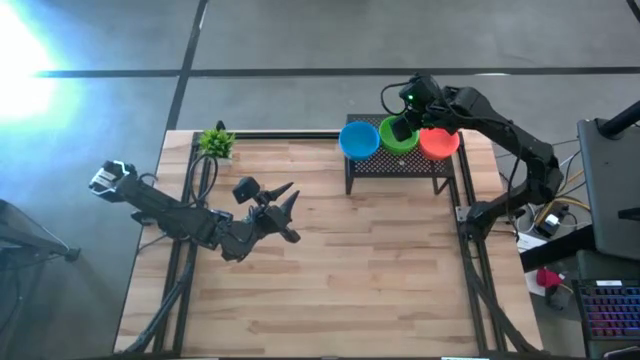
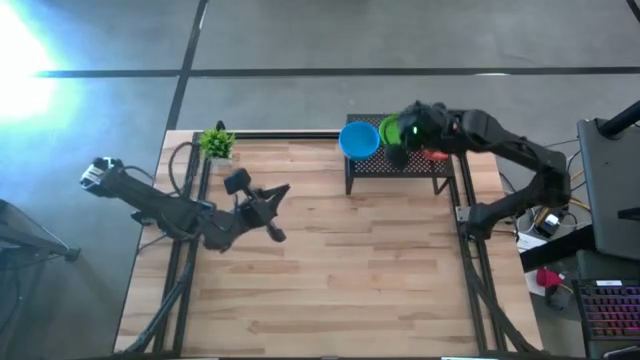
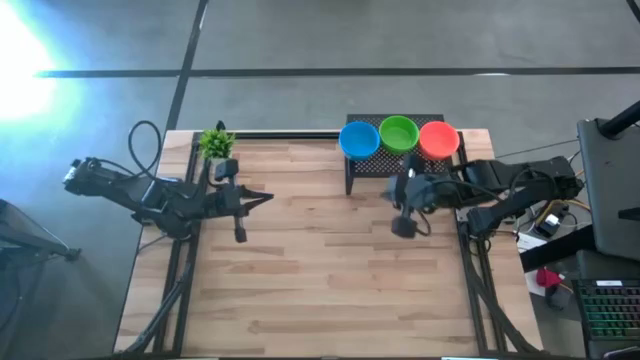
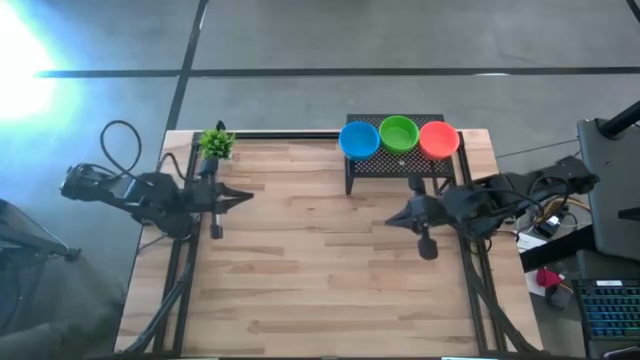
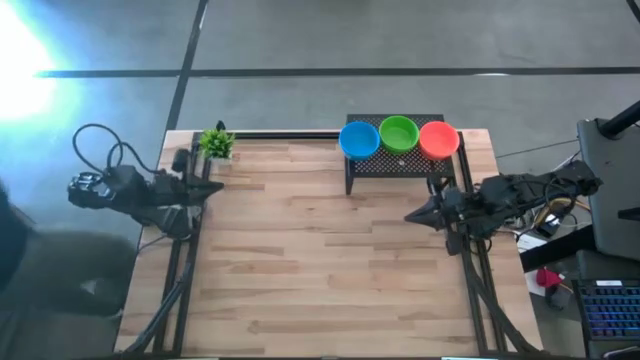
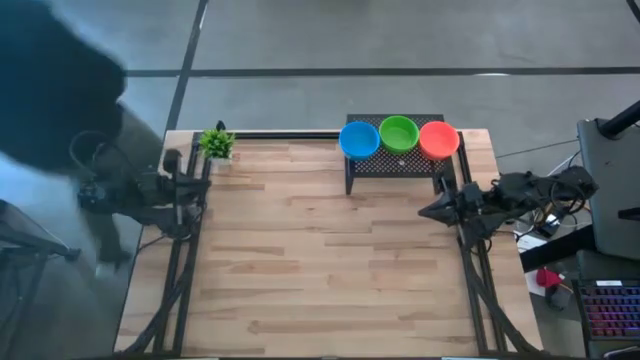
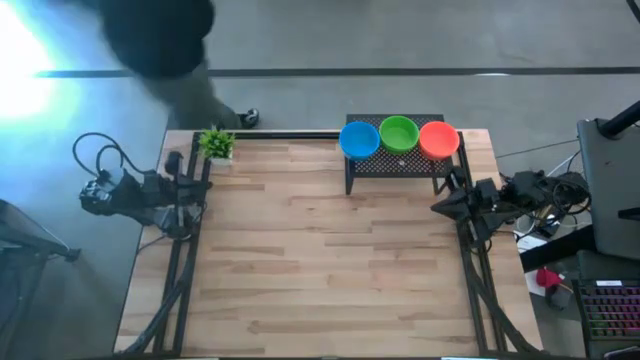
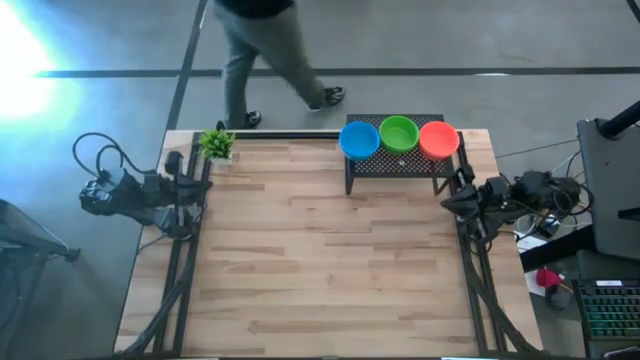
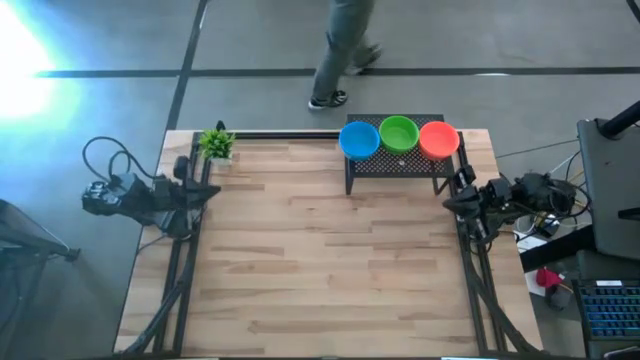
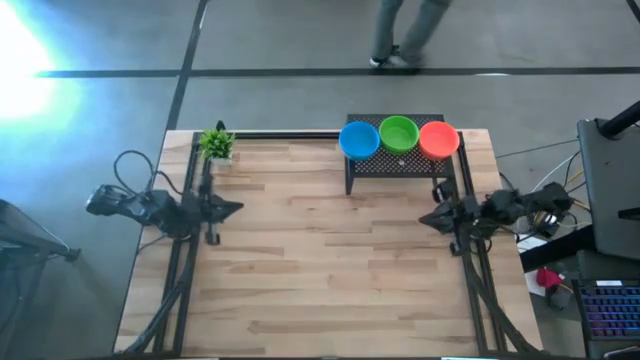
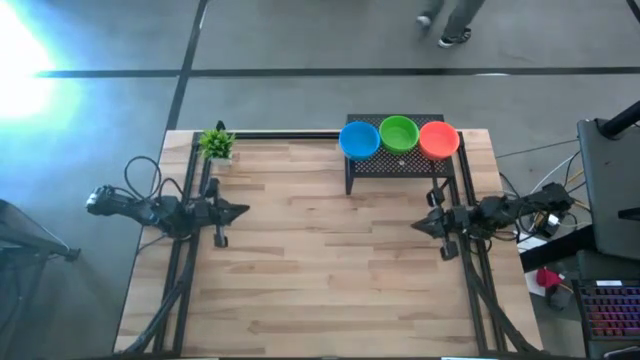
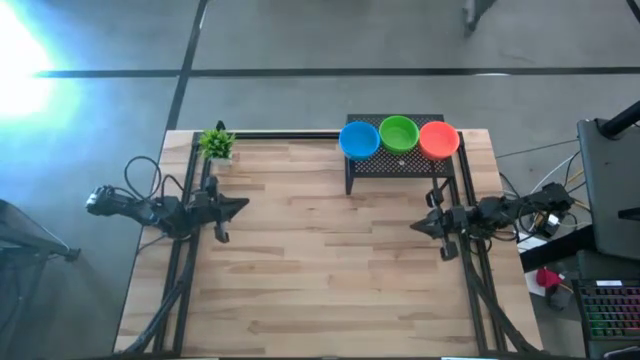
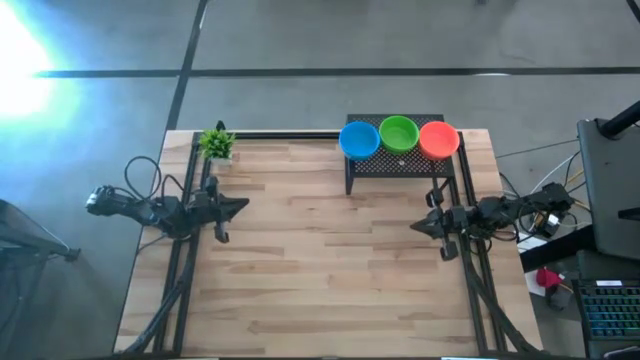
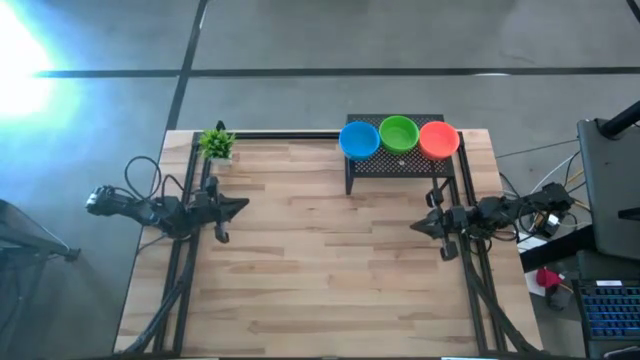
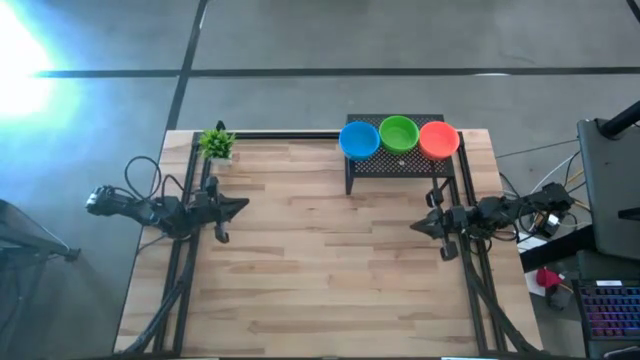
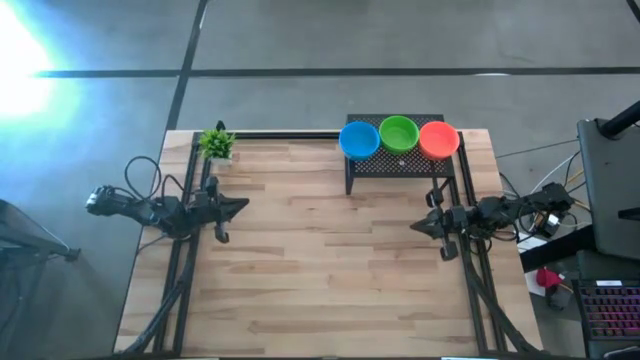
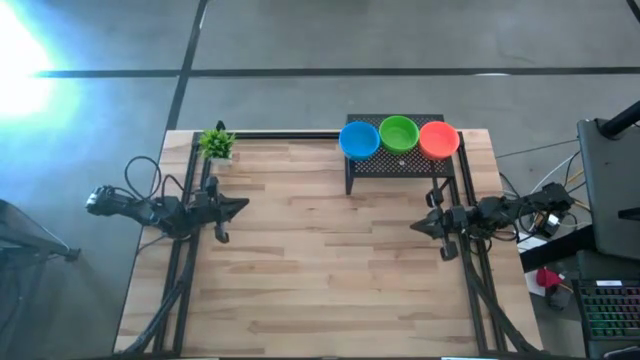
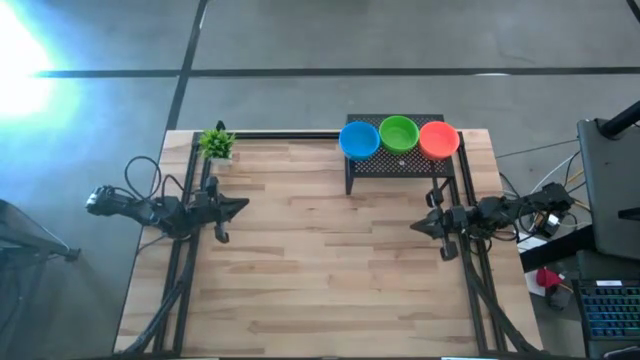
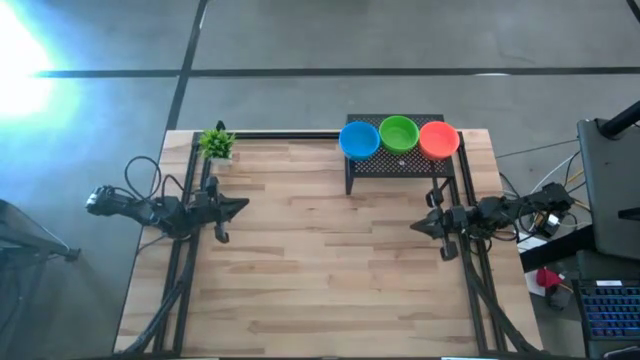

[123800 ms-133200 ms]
Task: Pick & Place Mini bowls
Return to Home Position

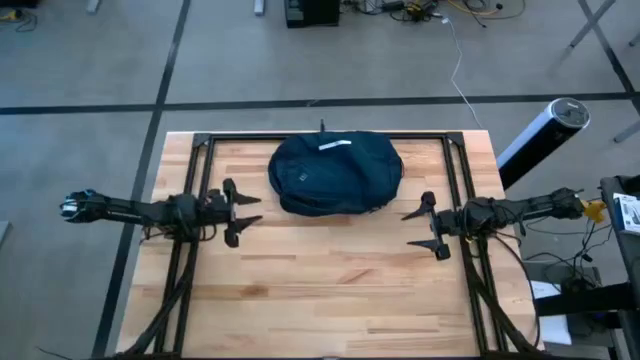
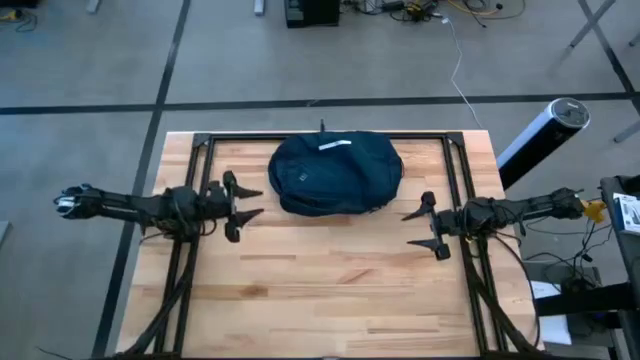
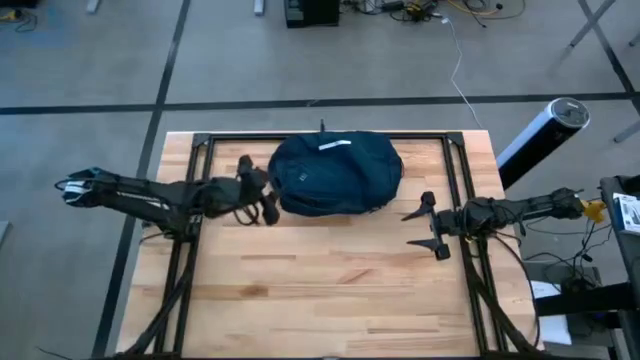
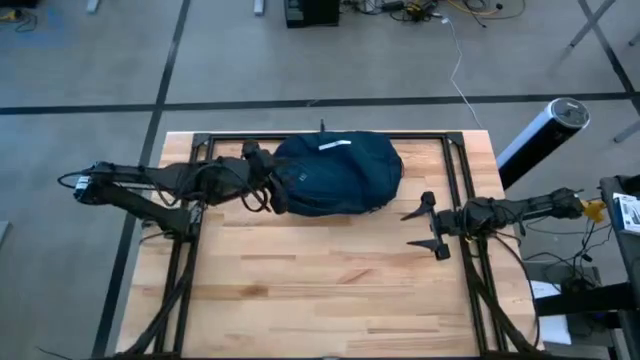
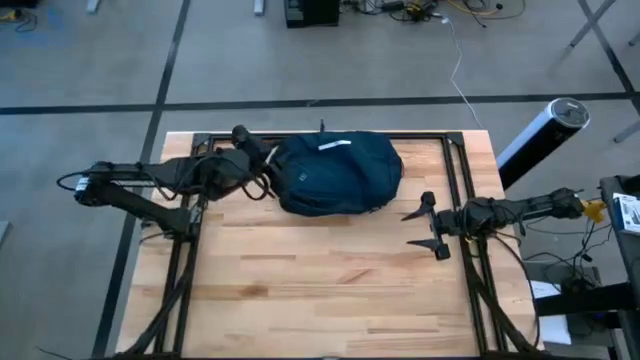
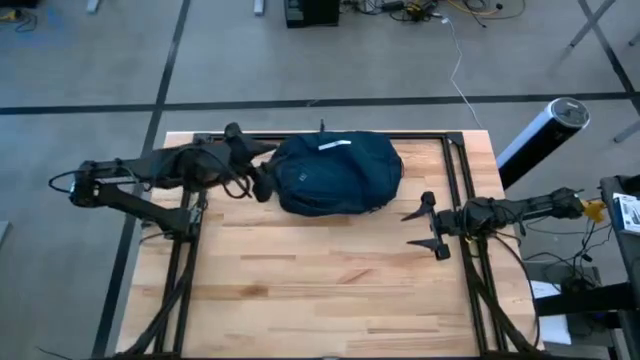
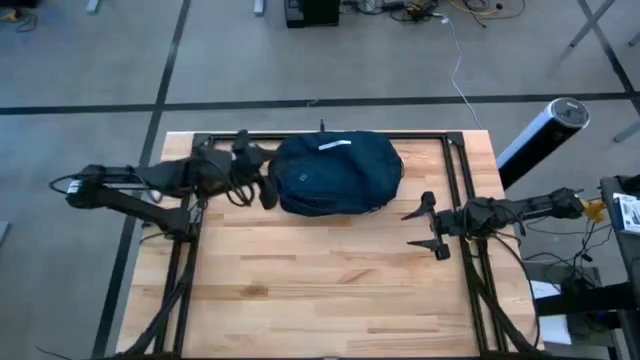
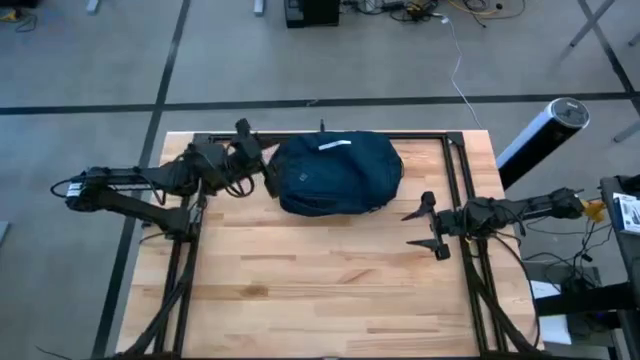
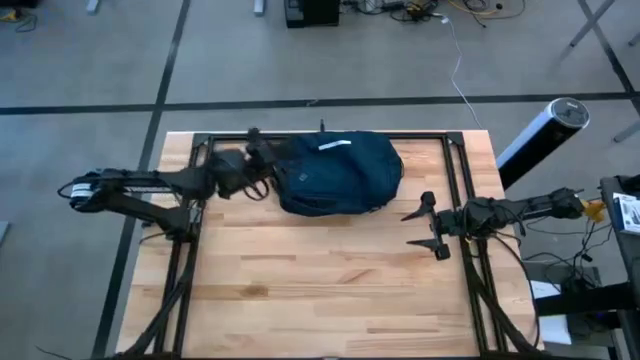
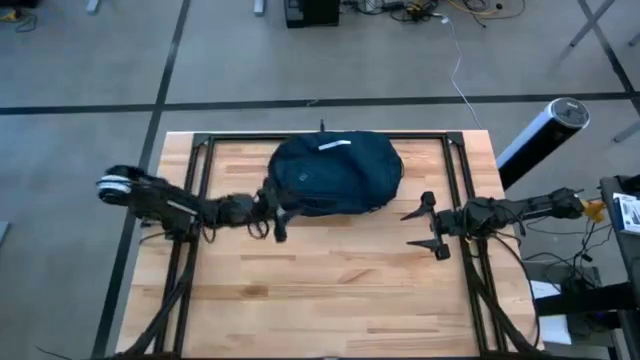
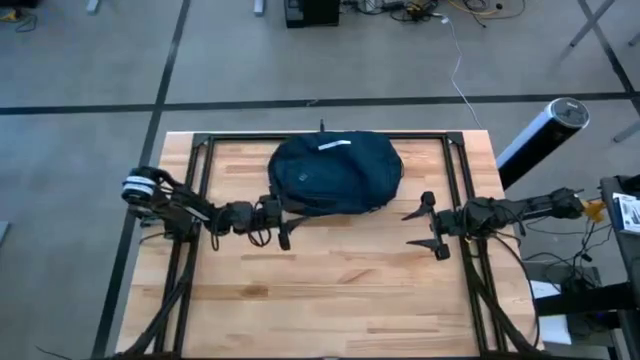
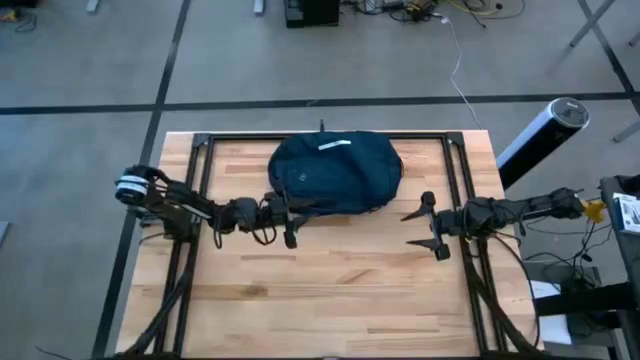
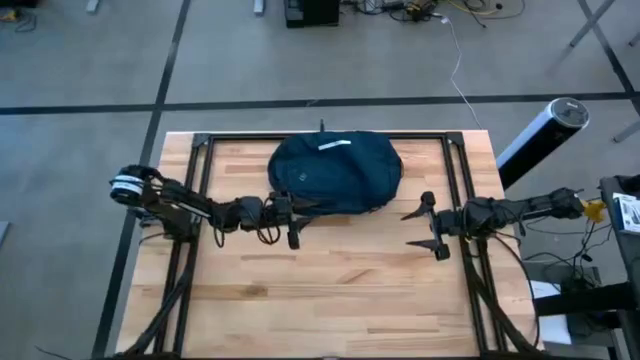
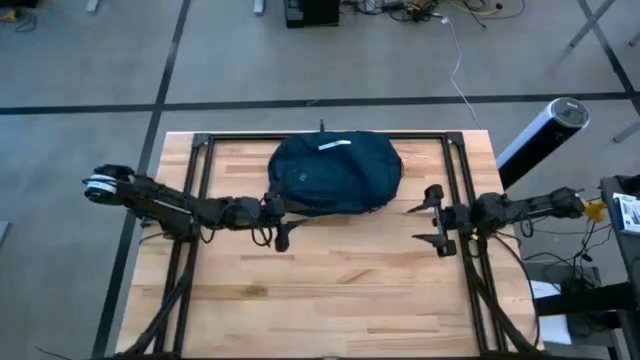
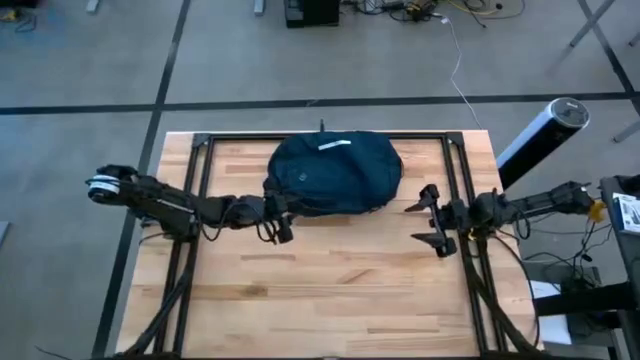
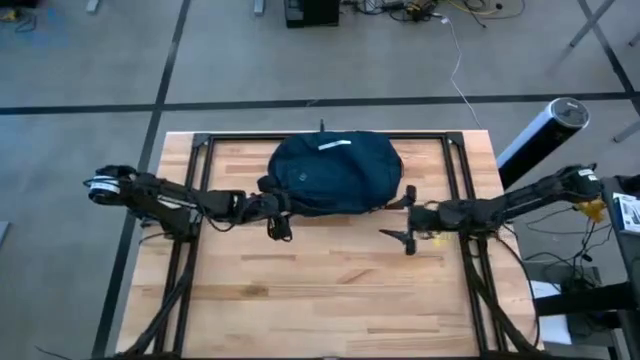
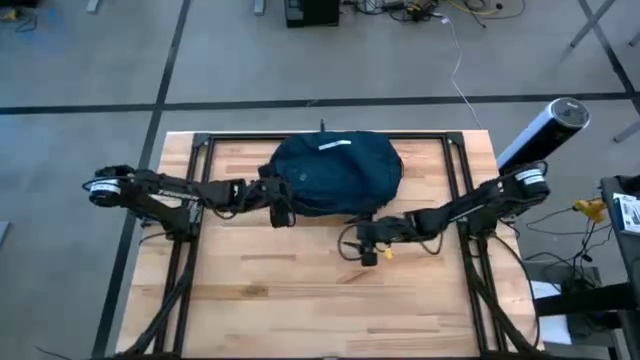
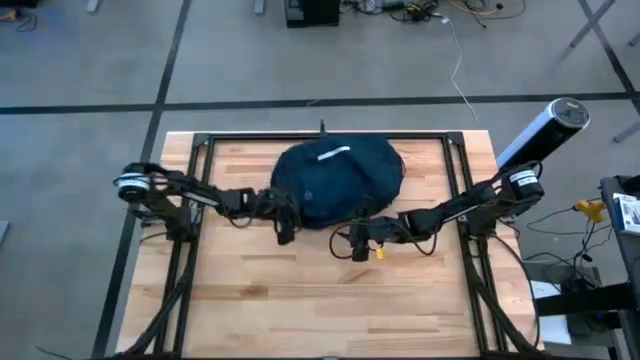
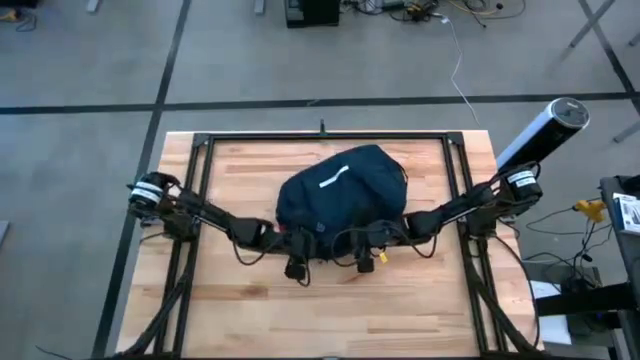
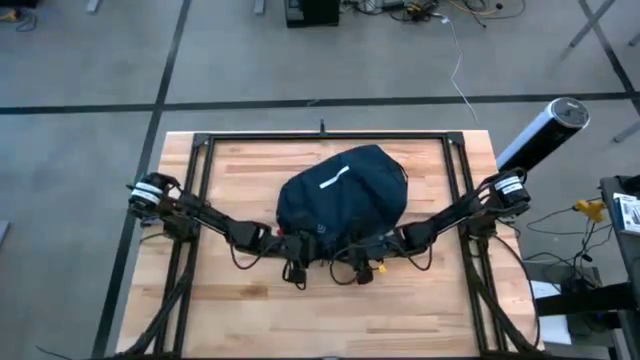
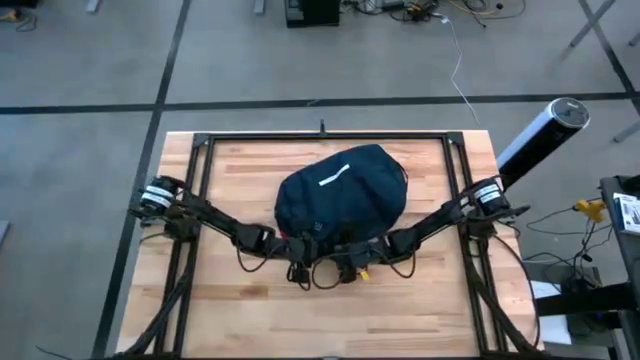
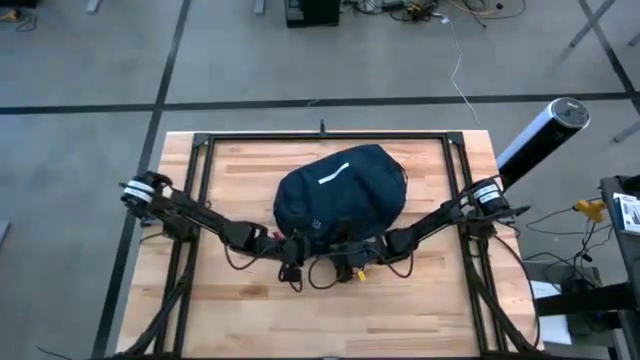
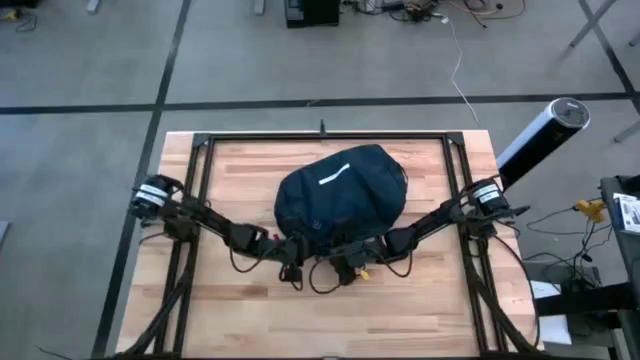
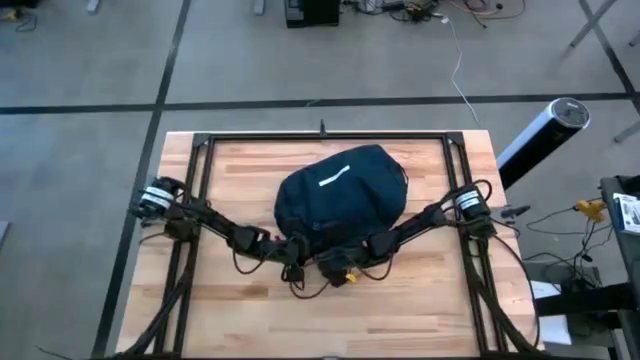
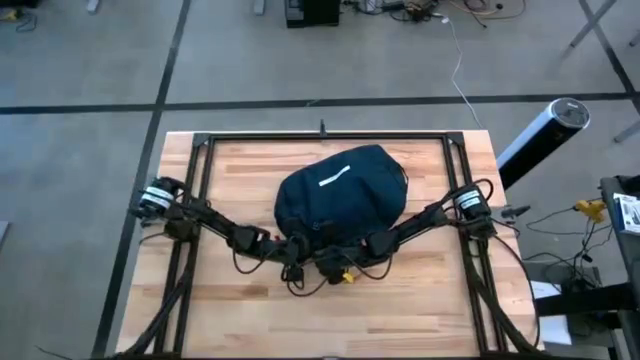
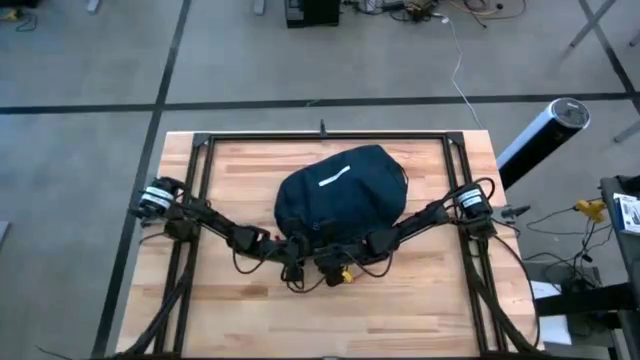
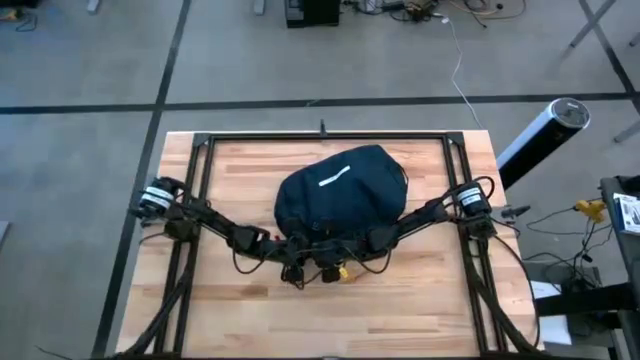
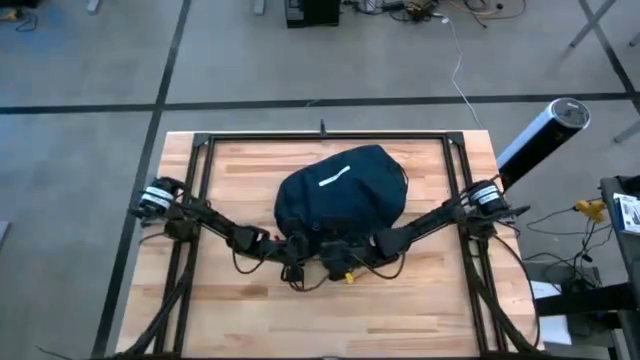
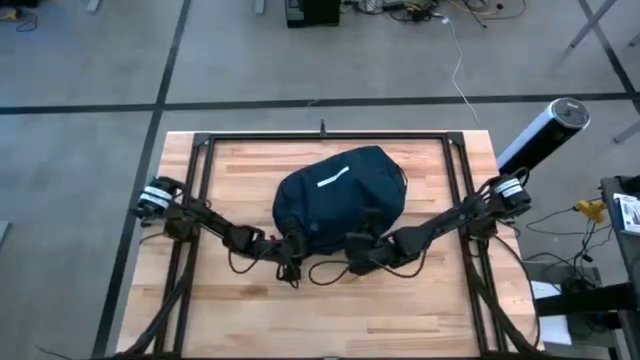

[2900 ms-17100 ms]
Task: Unpack backpack
Open the blue backpack
